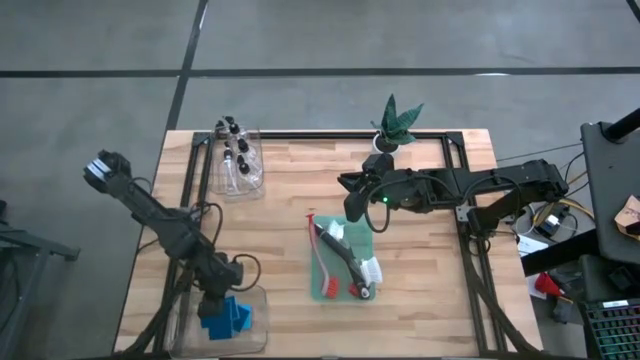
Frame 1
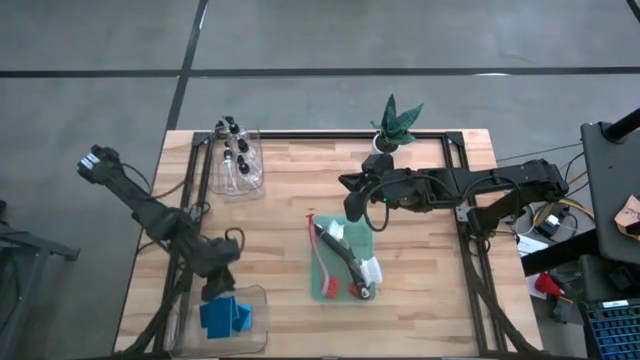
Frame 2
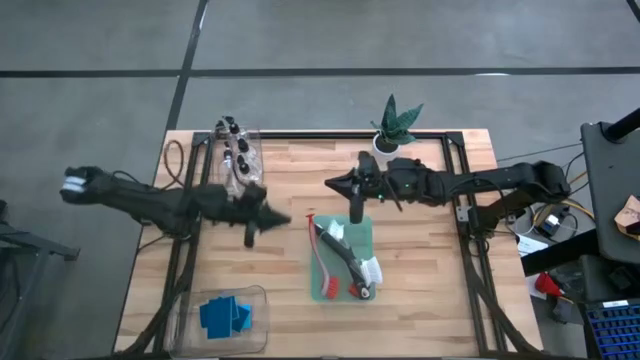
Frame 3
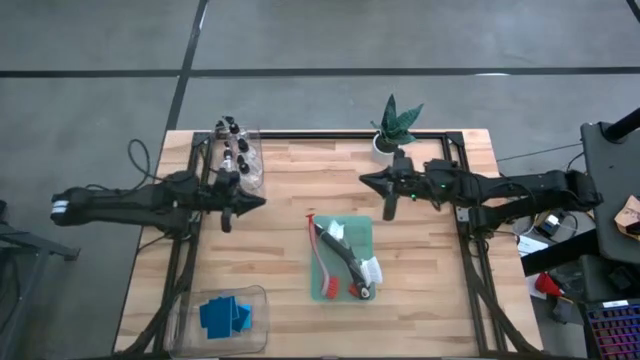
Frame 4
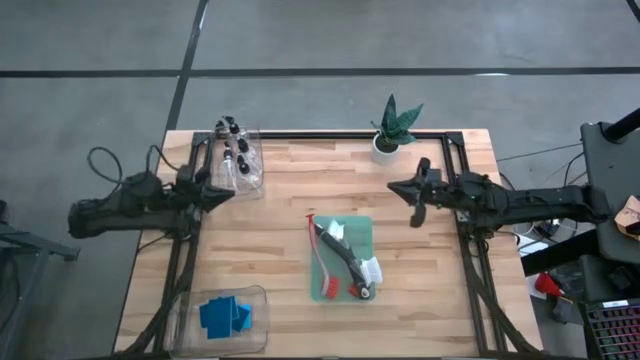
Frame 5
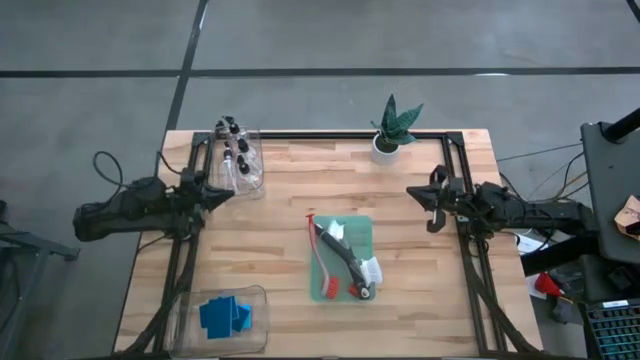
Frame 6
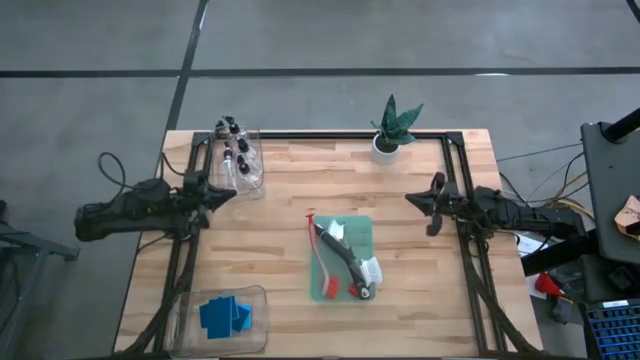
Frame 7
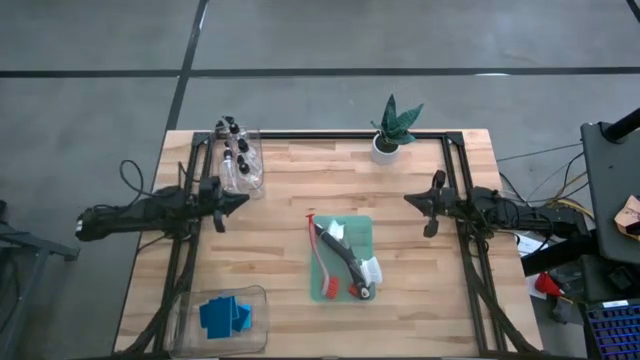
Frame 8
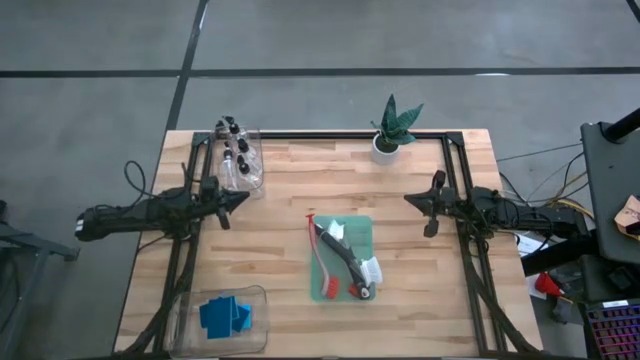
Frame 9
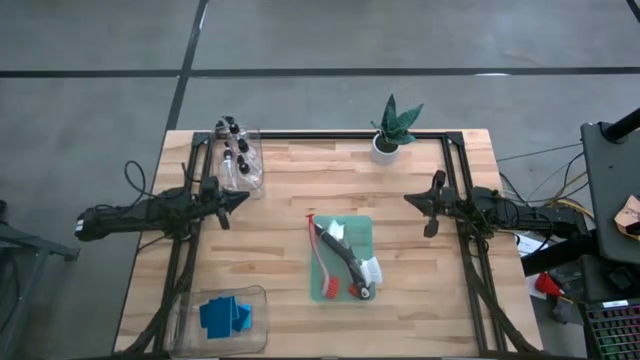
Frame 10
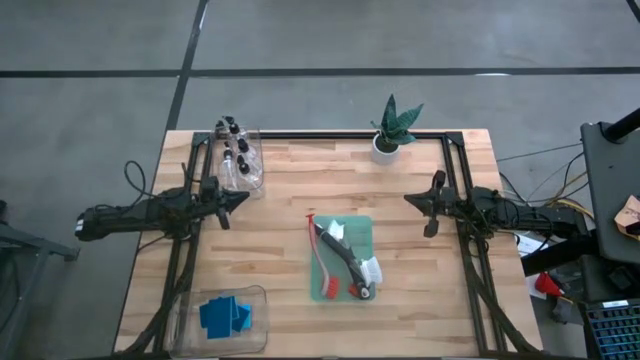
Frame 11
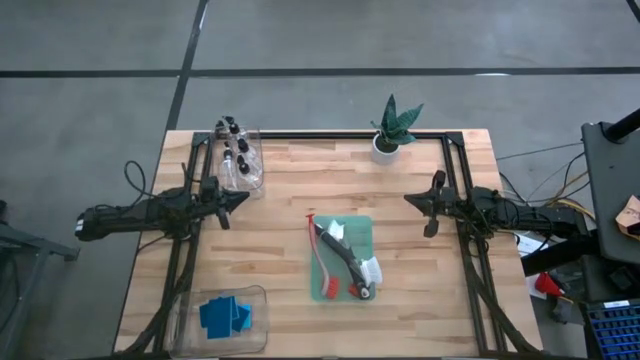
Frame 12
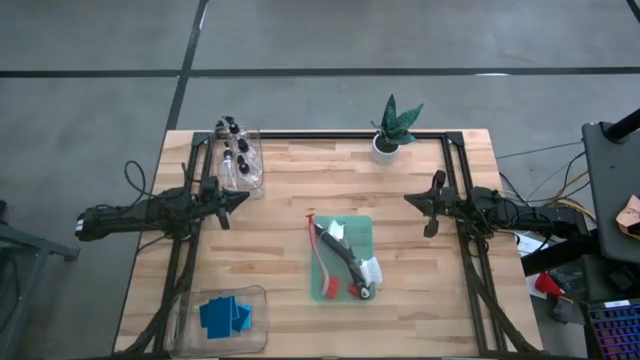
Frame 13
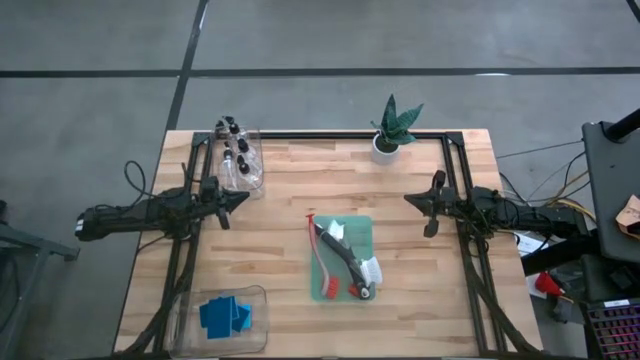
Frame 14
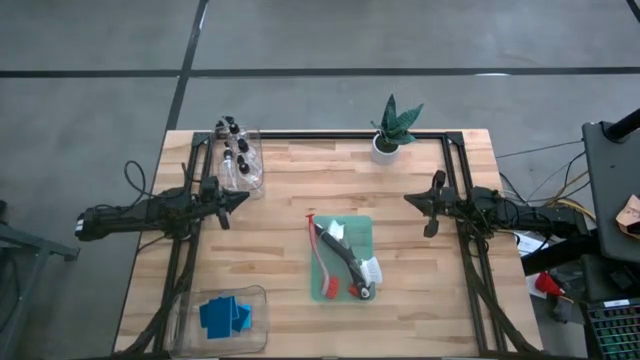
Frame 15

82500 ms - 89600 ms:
Task: Pick & Place Kitchen Sink Supplies
Return to Home Position

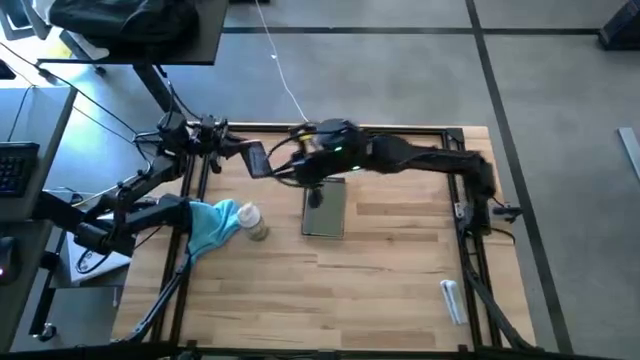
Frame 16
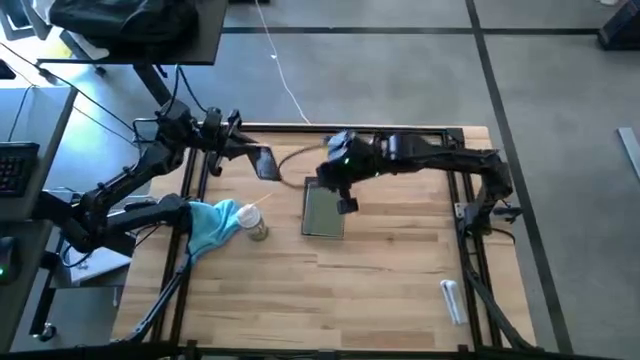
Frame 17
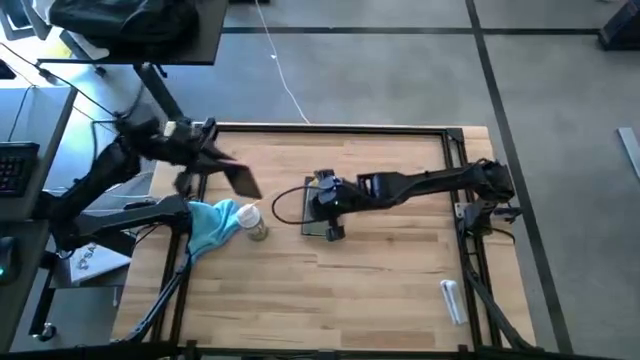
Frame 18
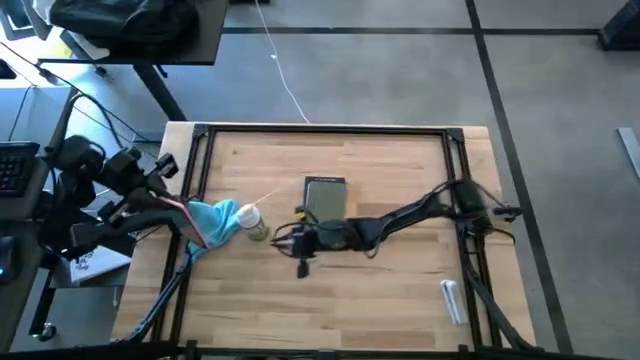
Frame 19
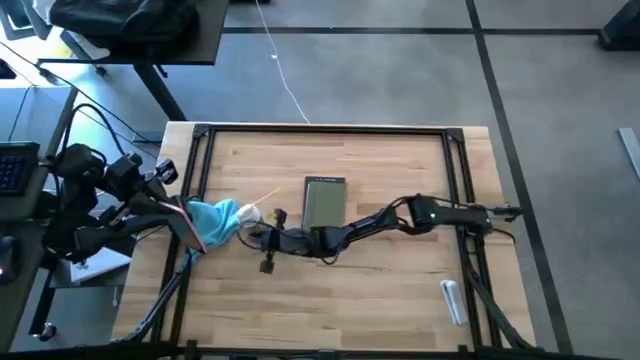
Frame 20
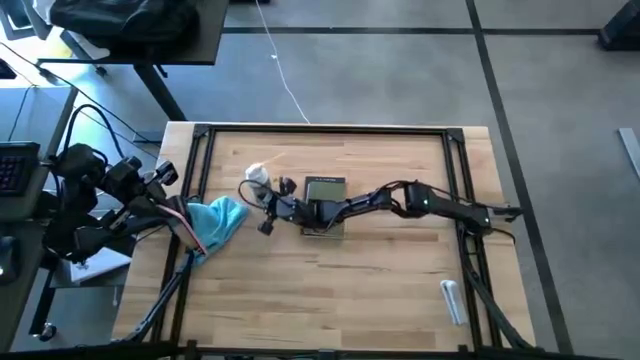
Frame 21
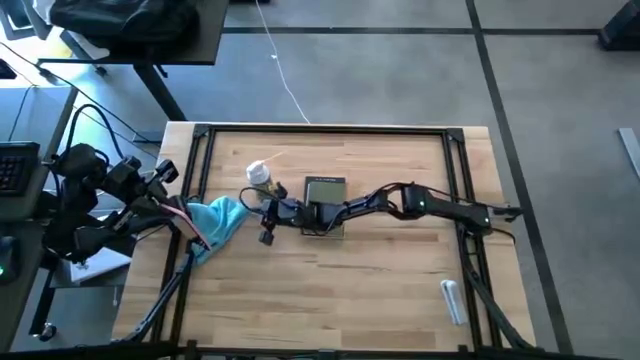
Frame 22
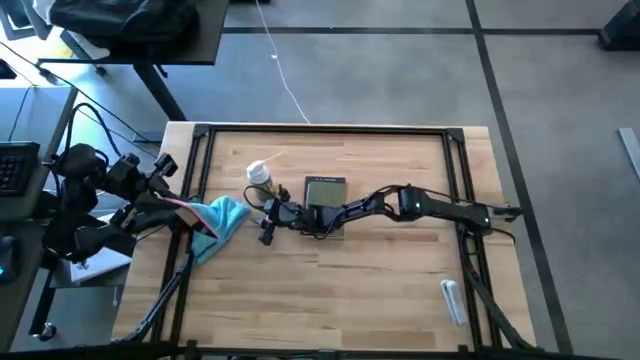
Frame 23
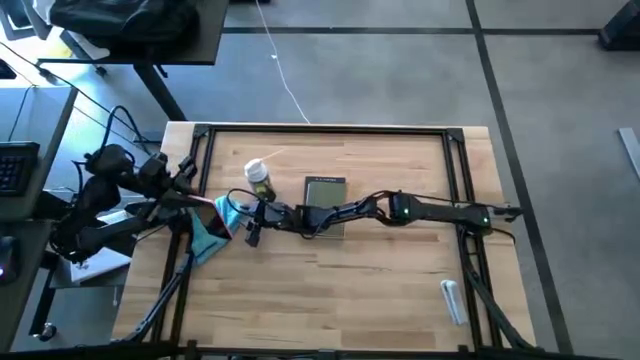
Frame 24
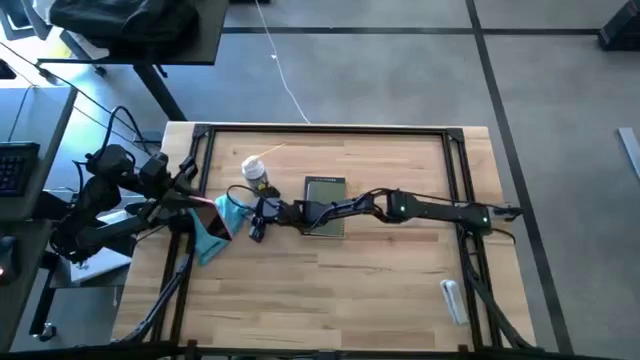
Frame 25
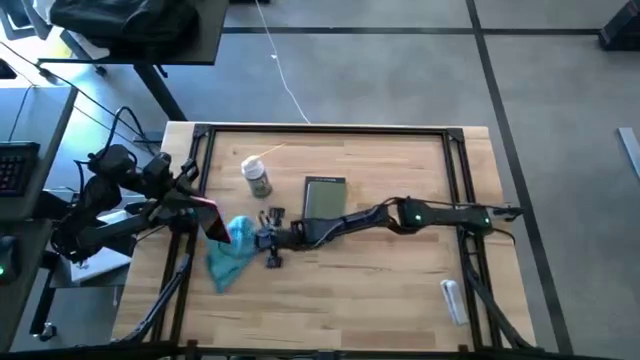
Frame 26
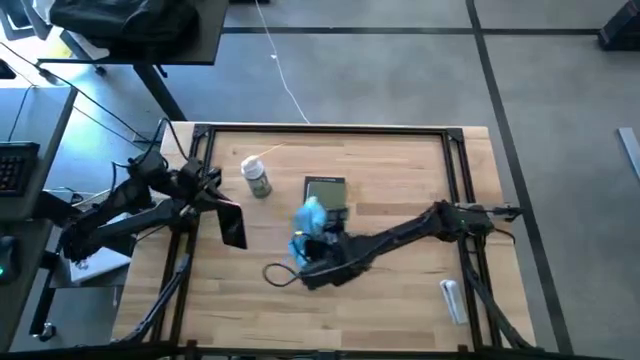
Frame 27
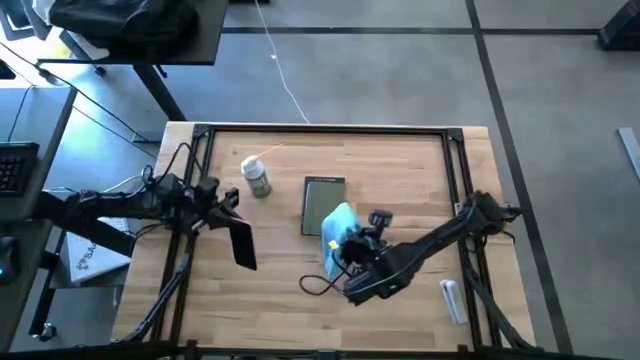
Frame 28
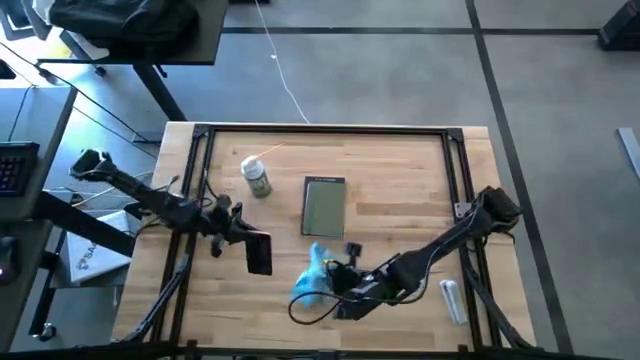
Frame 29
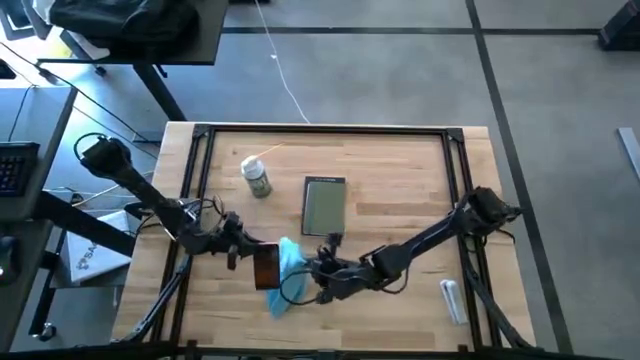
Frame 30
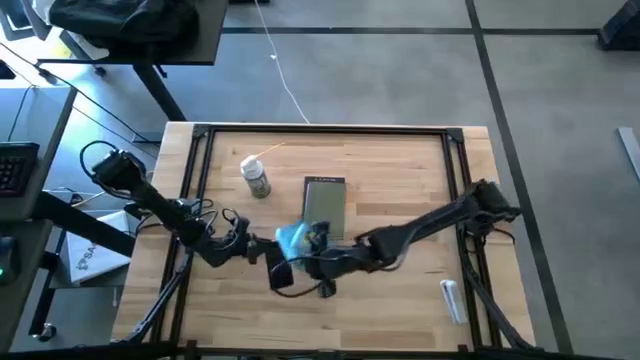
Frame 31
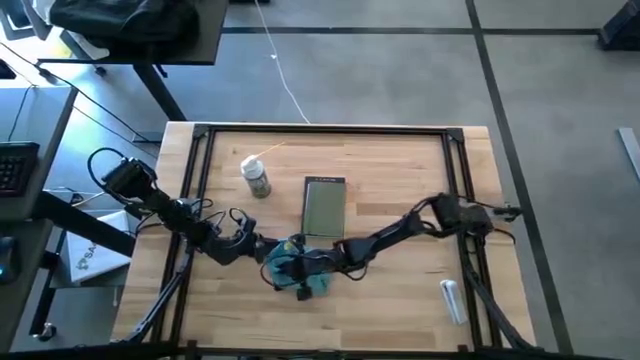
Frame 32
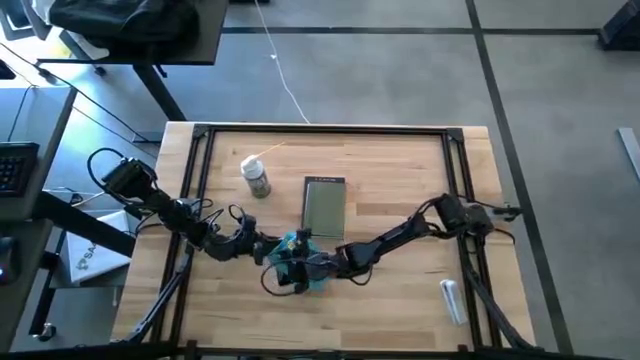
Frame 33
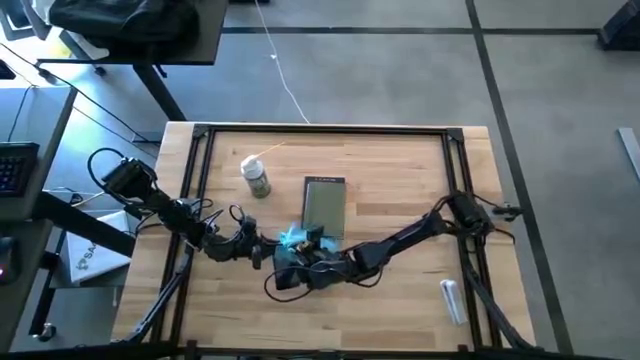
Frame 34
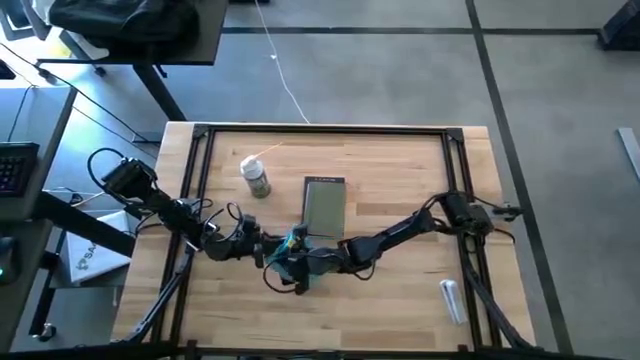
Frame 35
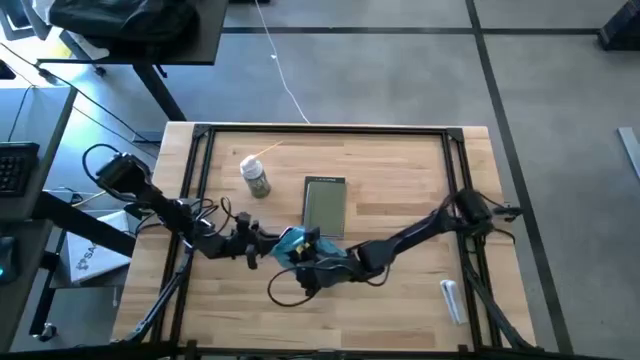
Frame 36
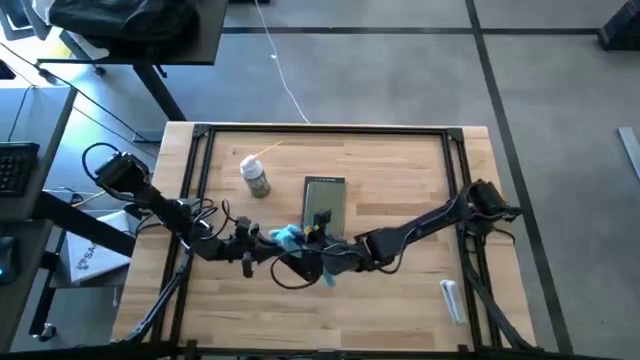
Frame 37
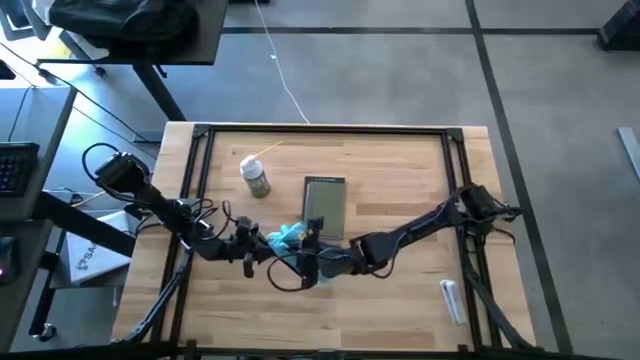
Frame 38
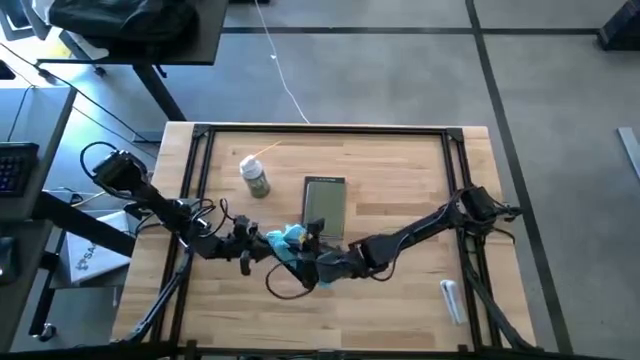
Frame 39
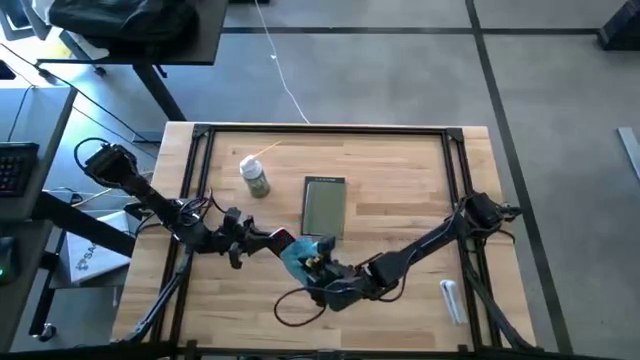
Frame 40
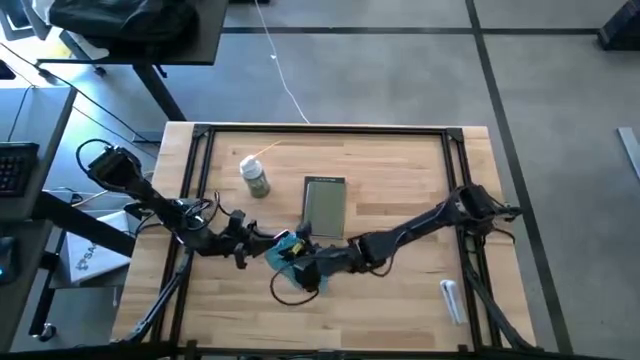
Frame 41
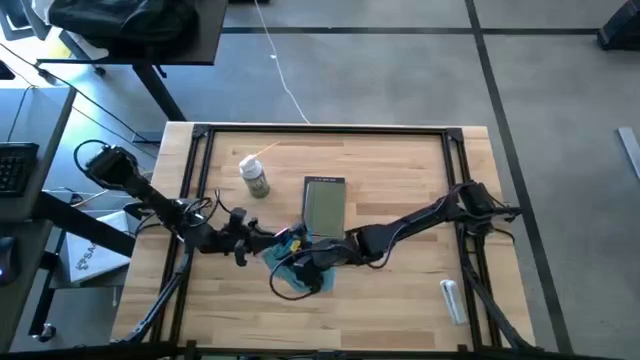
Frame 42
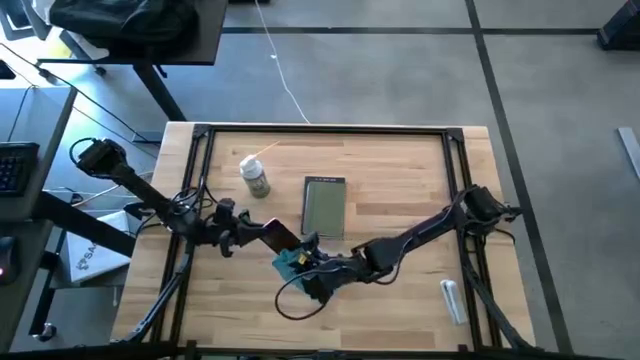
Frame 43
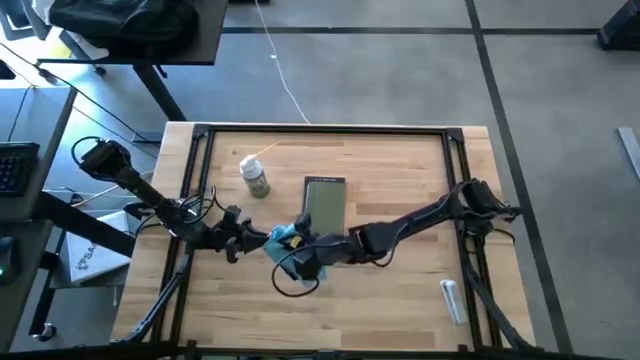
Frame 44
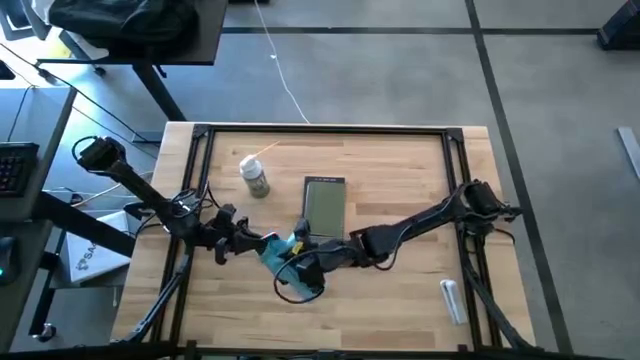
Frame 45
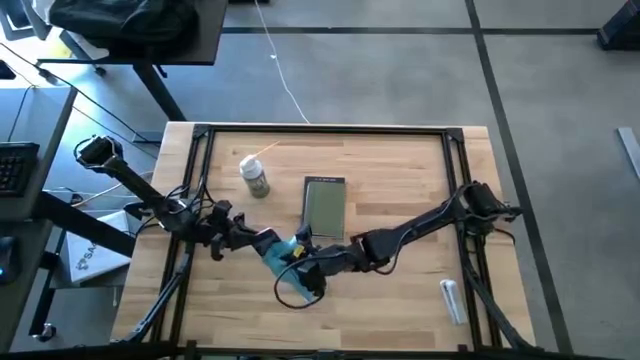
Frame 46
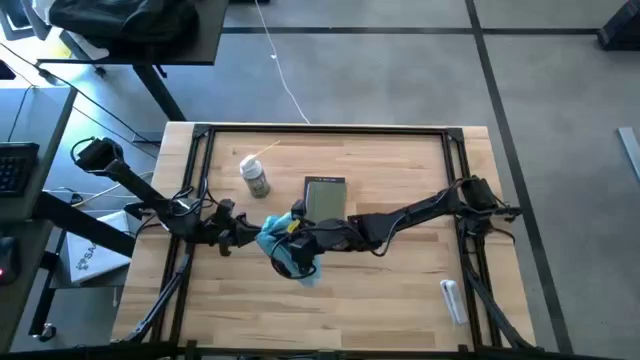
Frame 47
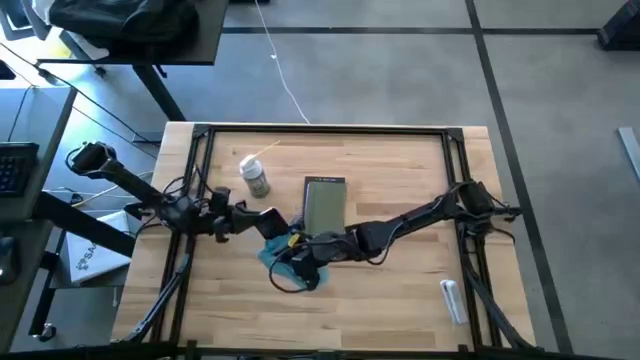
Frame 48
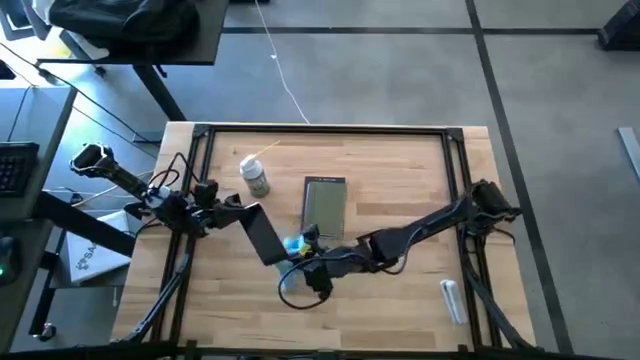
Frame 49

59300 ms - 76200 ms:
Task: Apply microfiber cloth
Wipe the cellphone with a microfiber cloth
